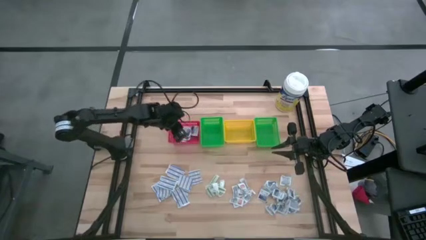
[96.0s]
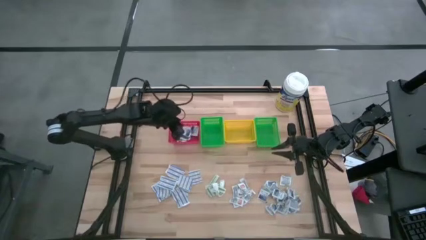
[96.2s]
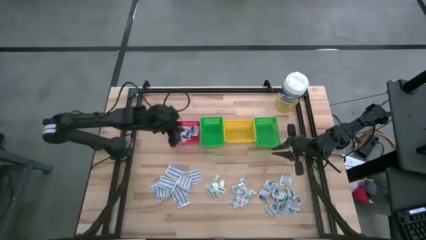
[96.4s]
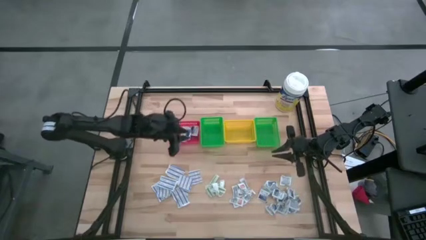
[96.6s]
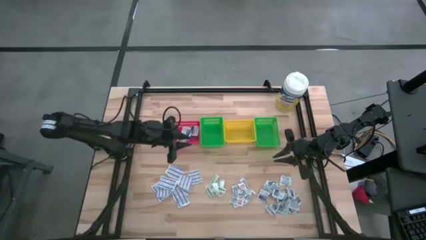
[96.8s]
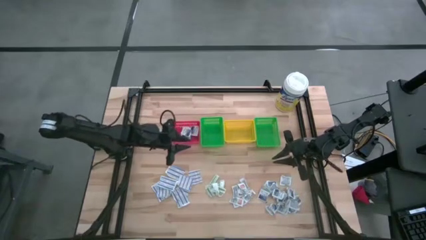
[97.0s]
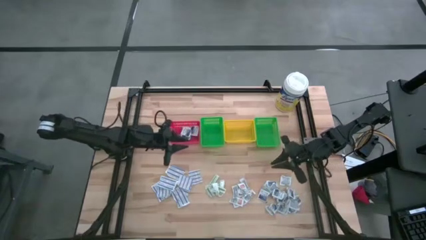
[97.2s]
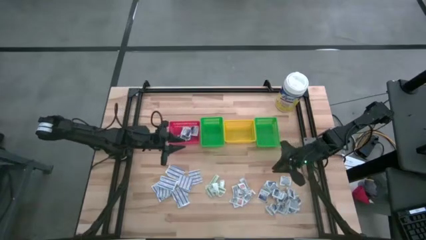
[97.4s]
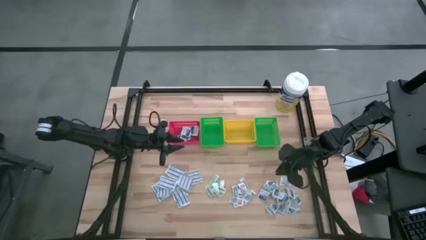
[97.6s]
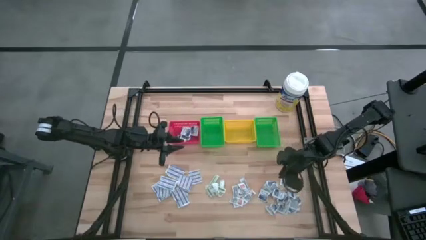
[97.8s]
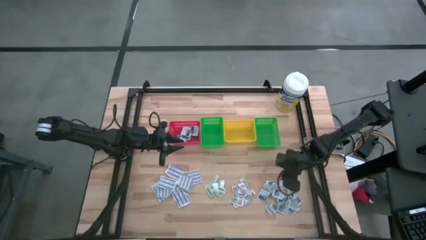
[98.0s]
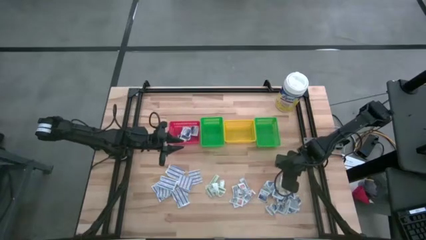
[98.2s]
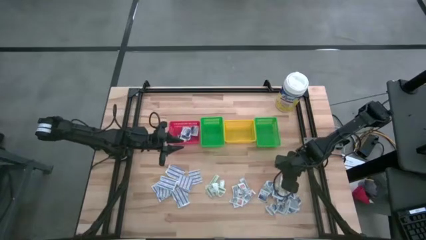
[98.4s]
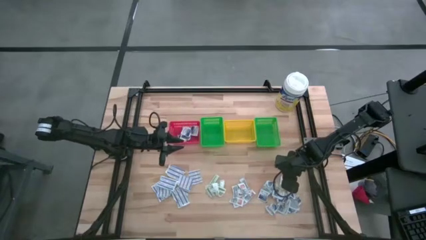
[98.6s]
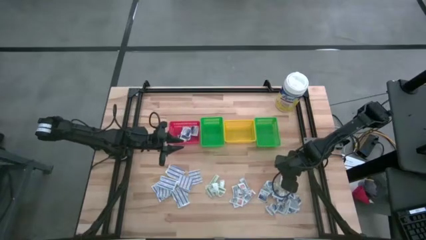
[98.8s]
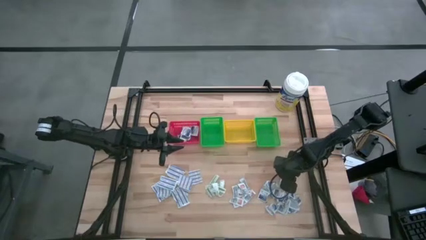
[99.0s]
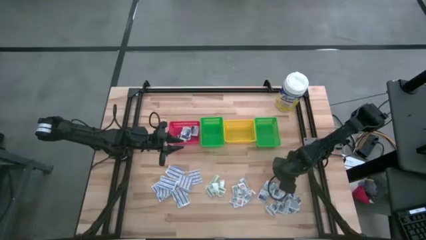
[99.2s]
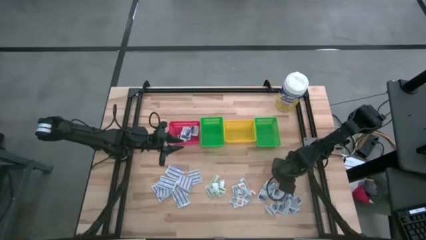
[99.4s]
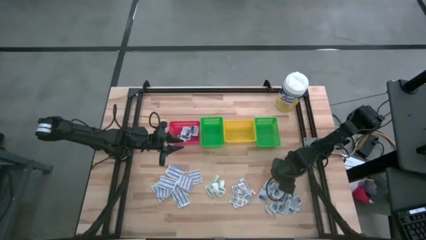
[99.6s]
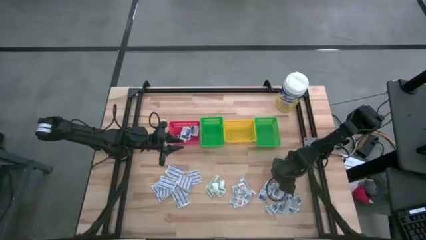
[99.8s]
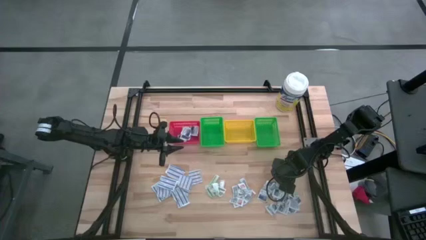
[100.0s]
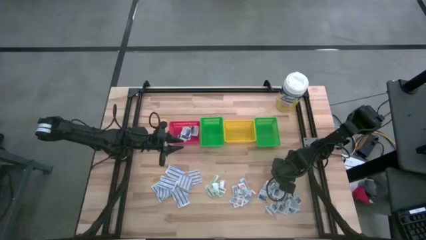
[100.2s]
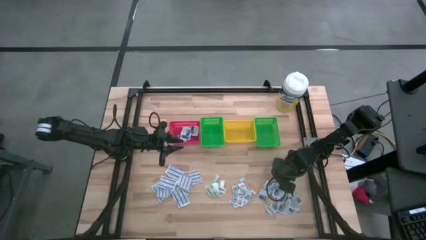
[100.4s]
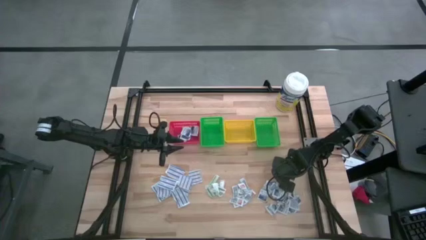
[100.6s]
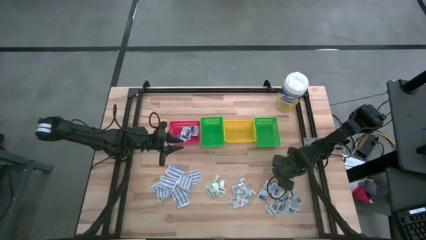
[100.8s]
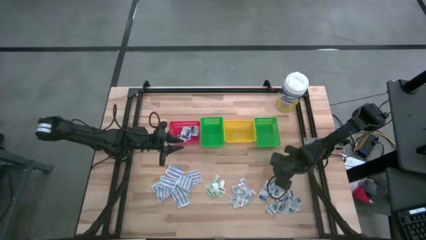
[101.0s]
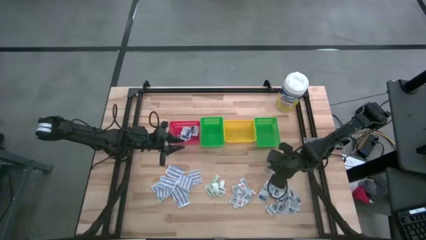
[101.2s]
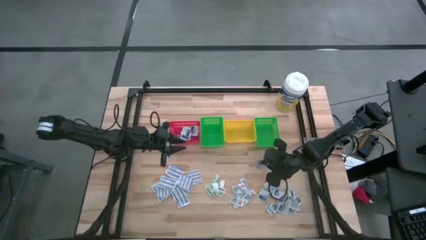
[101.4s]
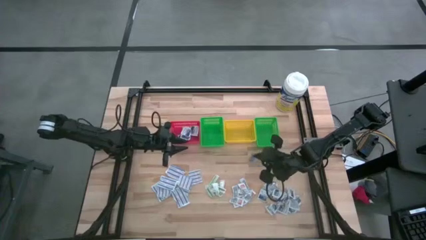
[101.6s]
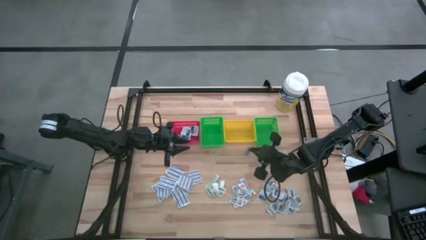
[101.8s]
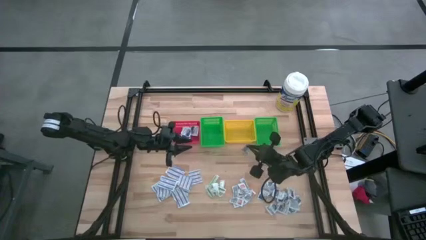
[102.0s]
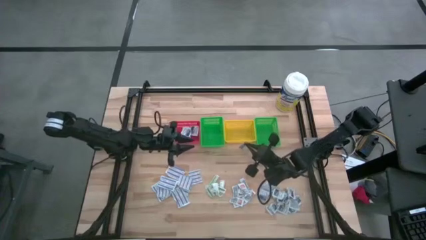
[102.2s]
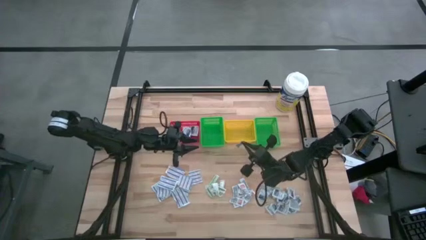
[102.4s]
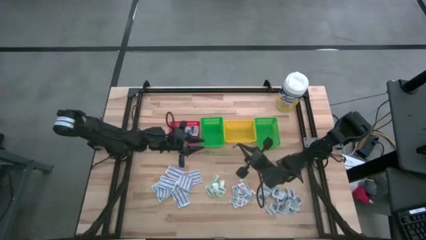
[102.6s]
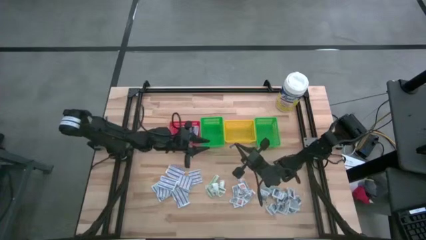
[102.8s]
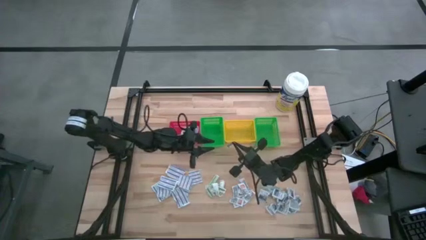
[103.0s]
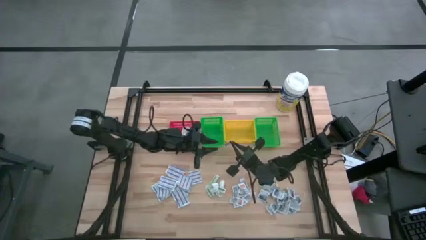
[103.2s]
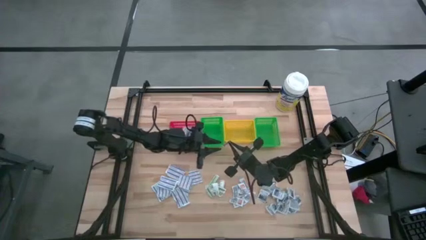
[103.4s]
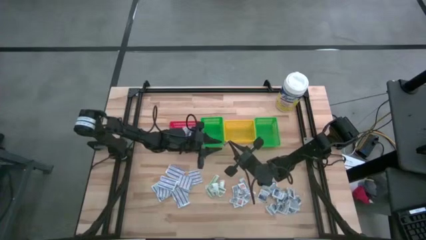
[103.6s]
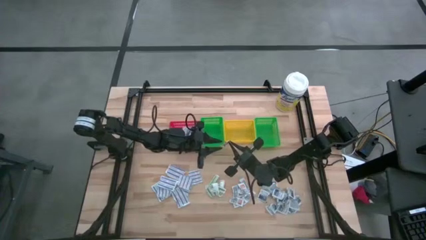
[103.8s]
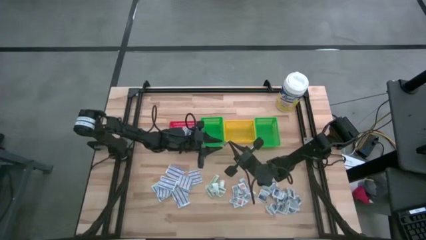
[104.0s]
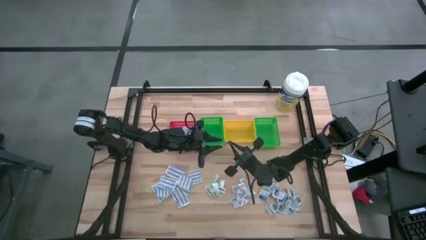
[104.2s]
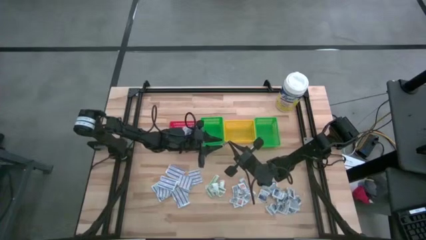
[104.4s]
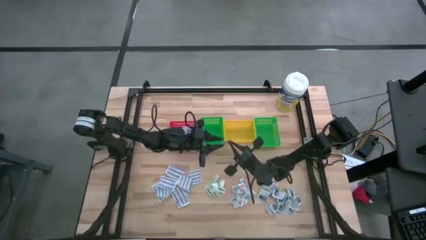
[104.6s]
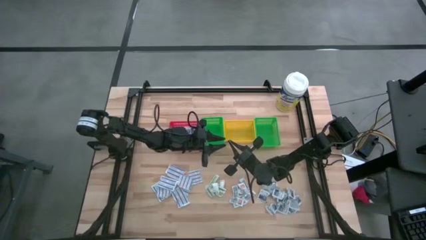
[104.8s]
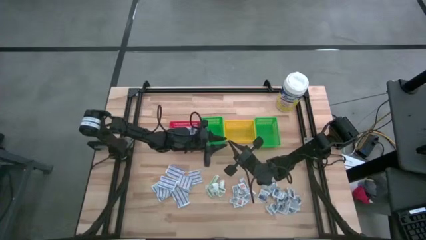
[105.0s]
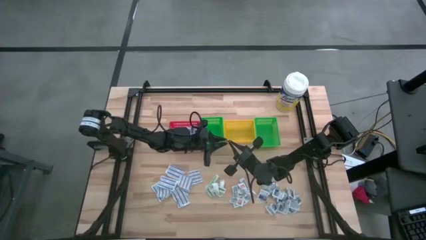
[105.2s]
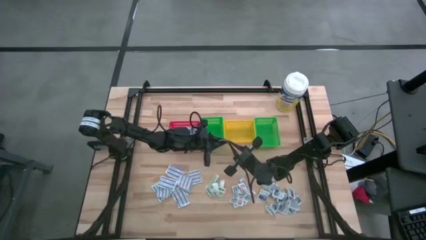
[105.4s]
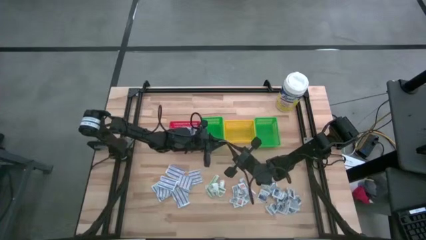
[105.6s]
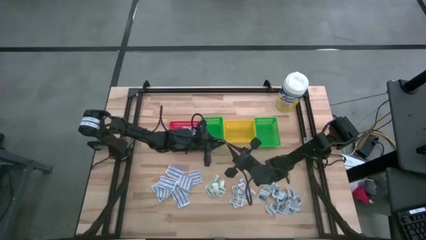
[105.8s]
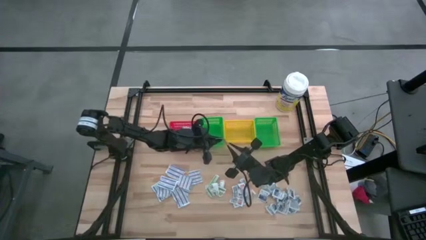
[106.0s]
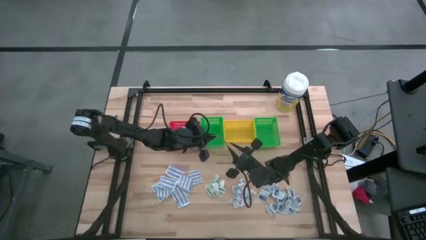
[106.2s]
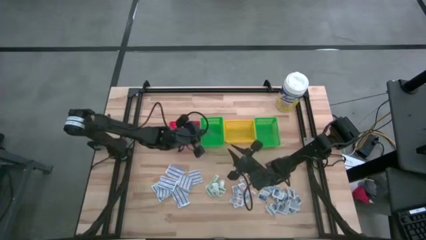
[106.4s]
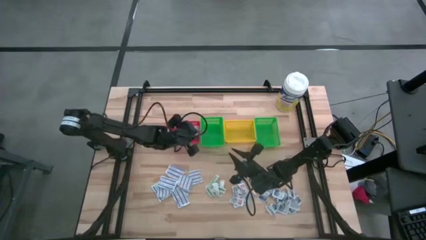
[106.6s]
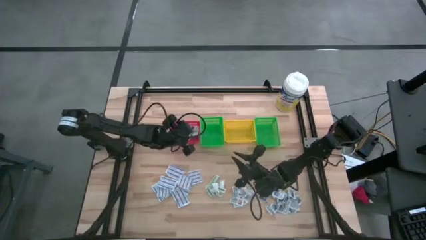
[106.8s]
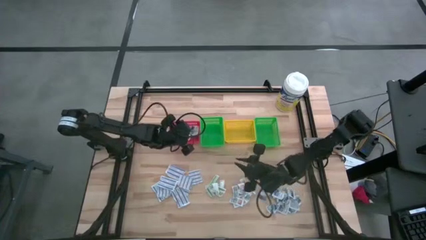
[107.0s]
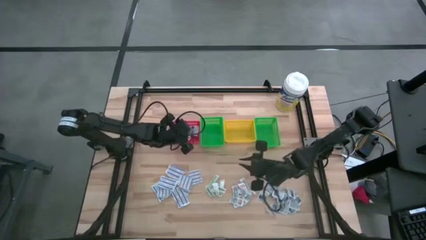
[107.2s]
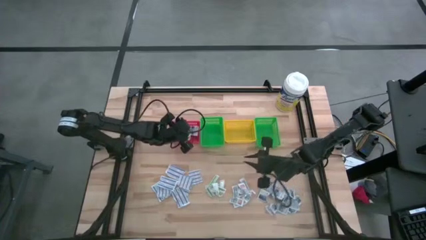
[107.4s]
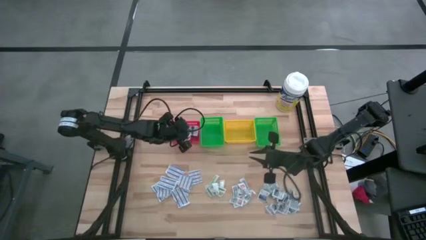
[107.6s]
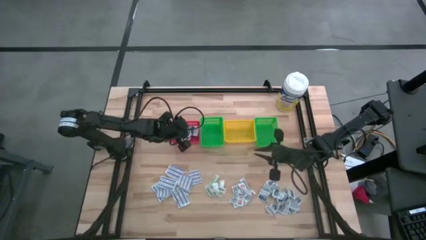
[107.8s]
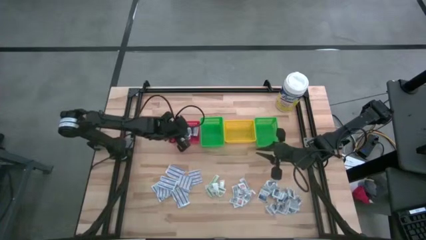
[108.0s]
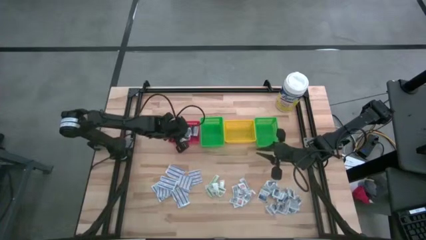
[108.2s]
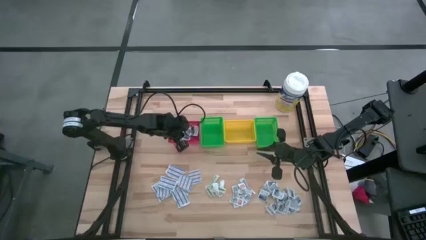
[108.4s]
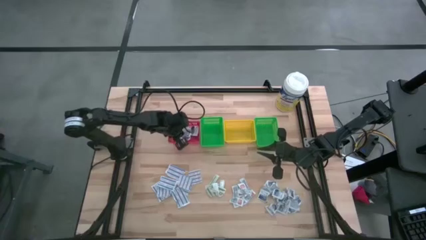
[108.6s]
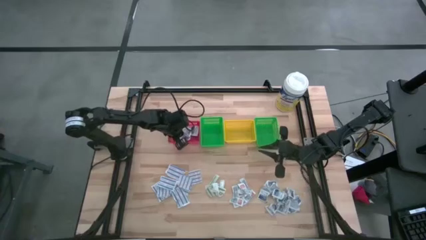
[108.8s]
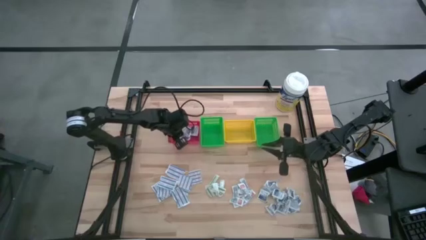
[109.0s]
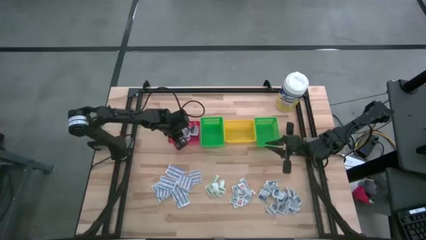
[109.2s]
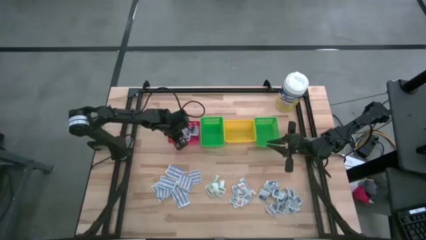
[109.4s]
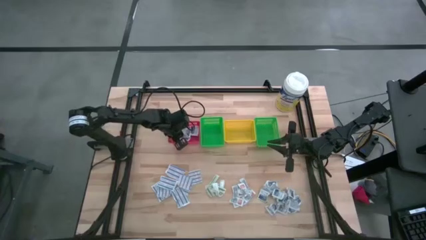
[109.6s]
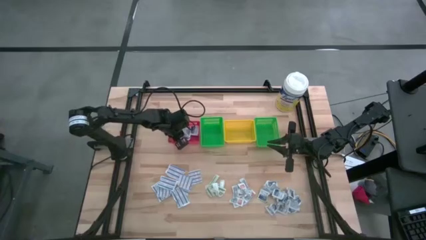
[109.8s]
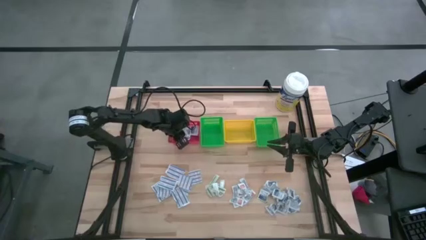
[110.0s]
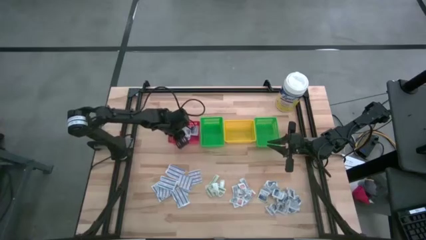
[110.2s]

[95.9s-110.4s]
Task: Pick & Place First Aid Supplies
Put the alcohol pad into the red basket
